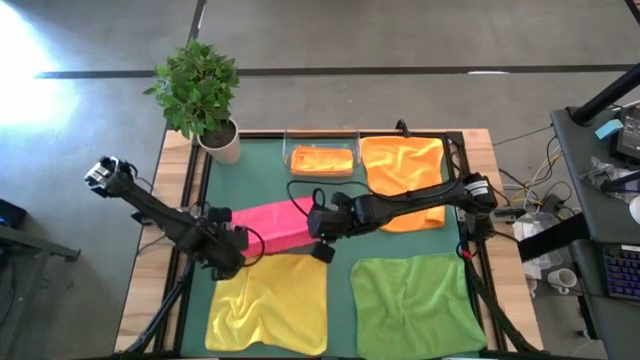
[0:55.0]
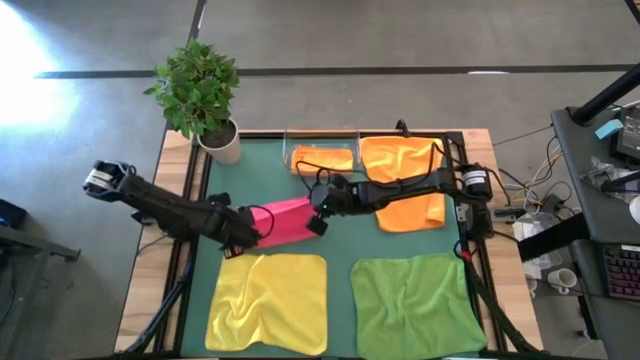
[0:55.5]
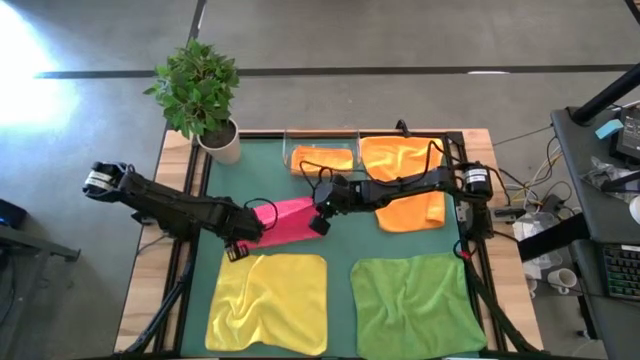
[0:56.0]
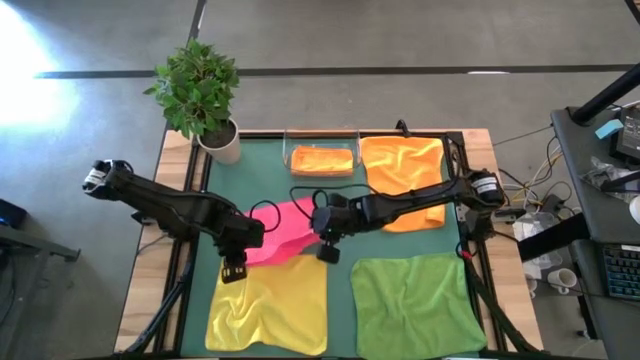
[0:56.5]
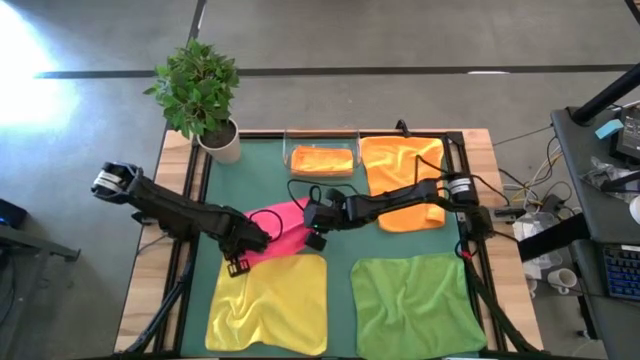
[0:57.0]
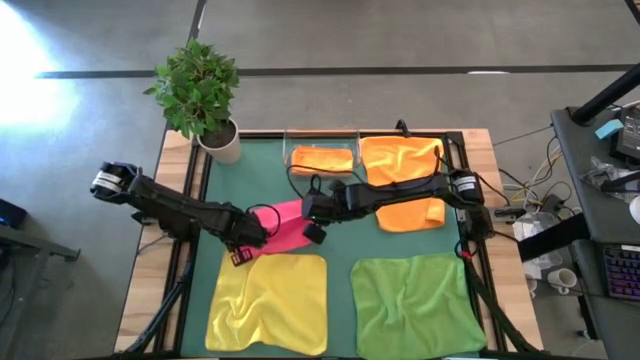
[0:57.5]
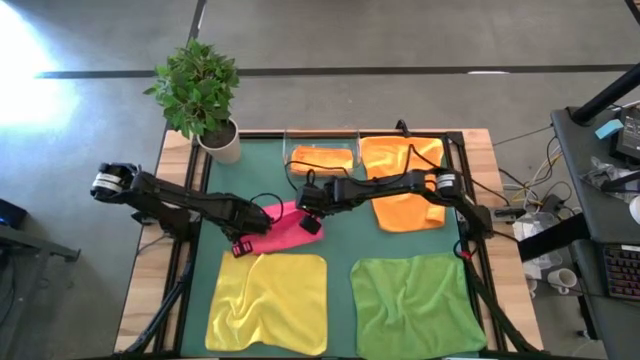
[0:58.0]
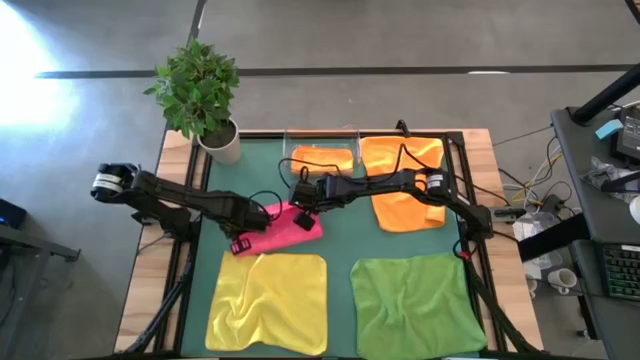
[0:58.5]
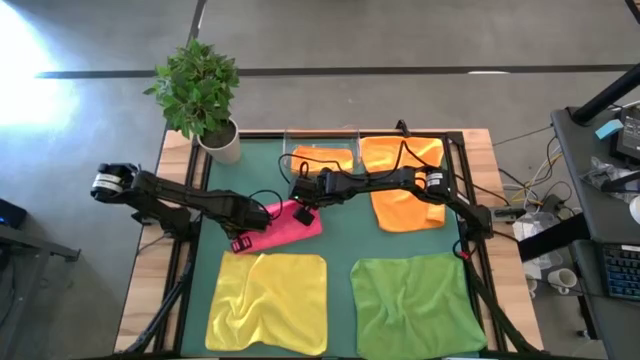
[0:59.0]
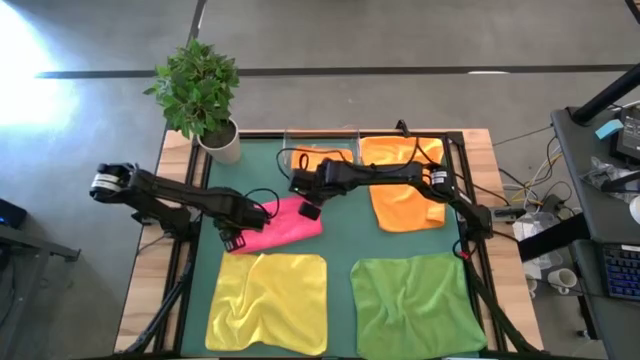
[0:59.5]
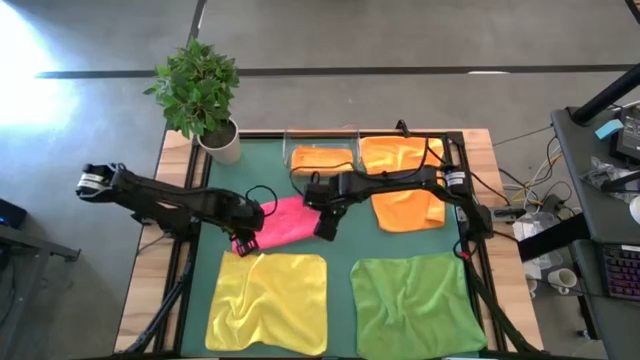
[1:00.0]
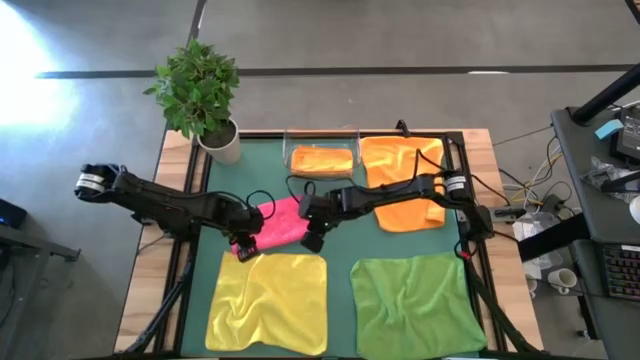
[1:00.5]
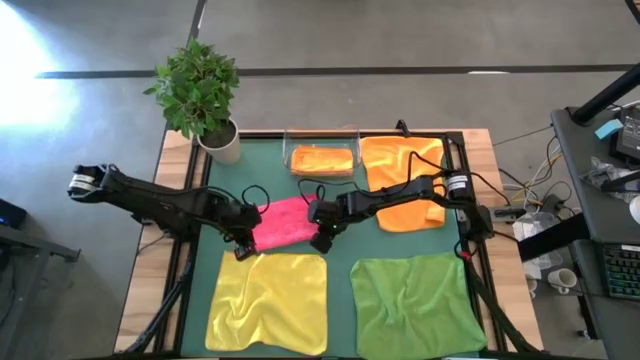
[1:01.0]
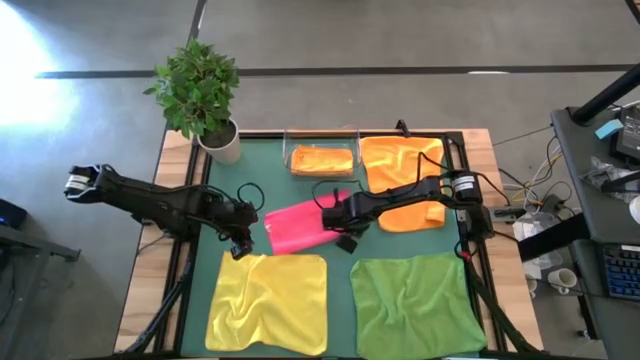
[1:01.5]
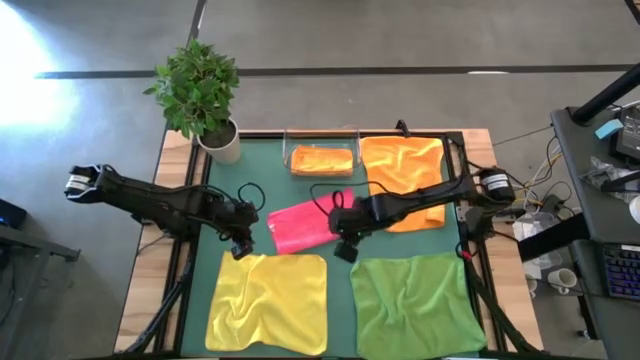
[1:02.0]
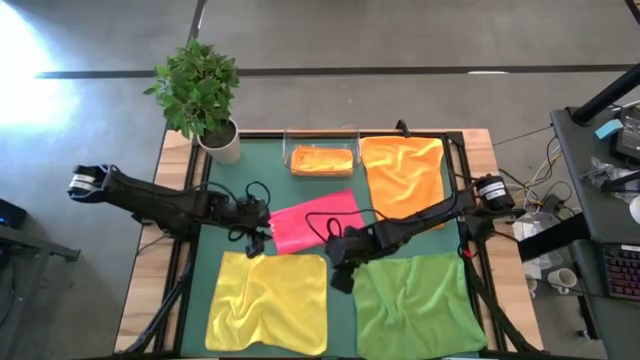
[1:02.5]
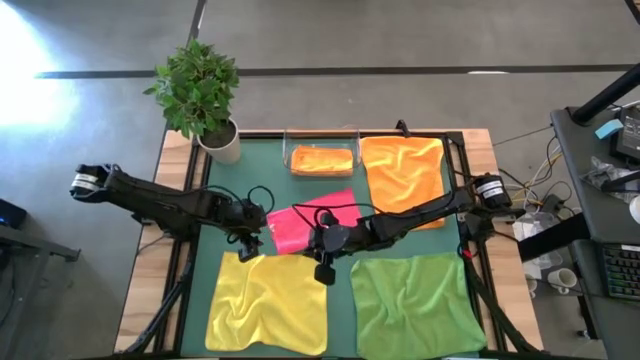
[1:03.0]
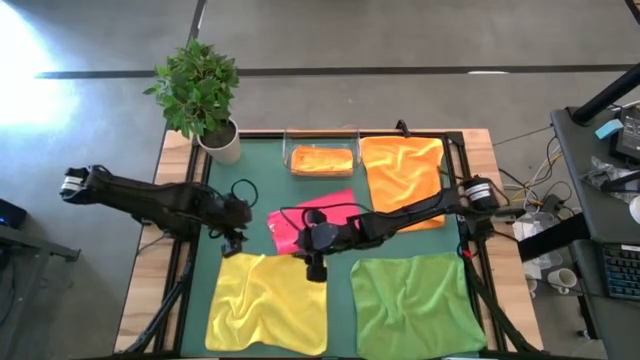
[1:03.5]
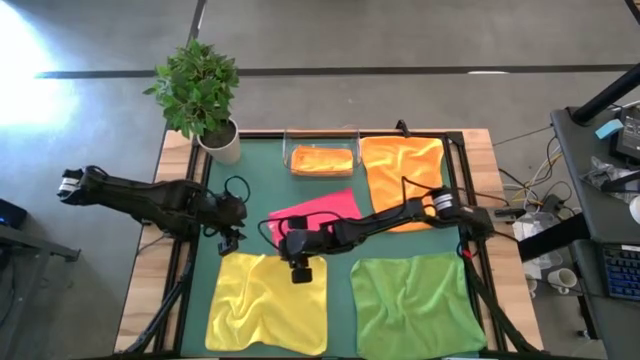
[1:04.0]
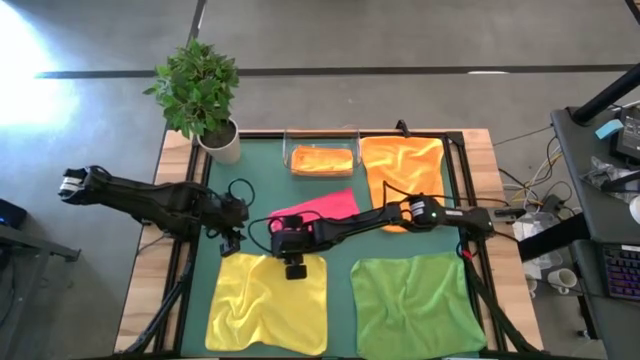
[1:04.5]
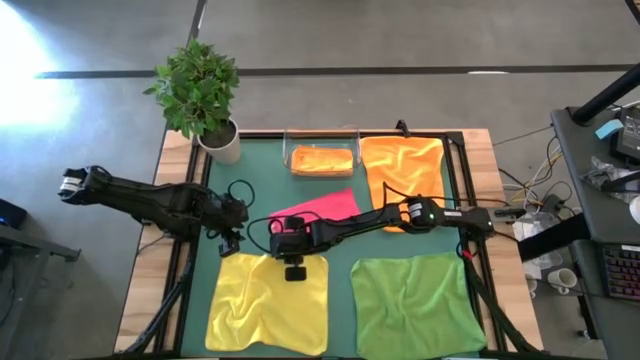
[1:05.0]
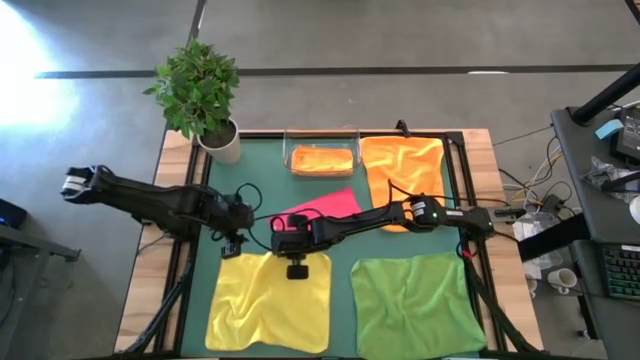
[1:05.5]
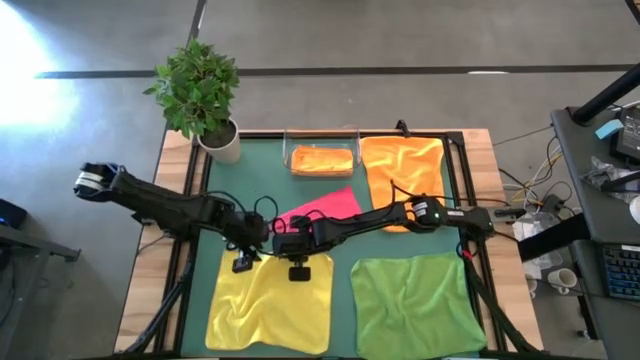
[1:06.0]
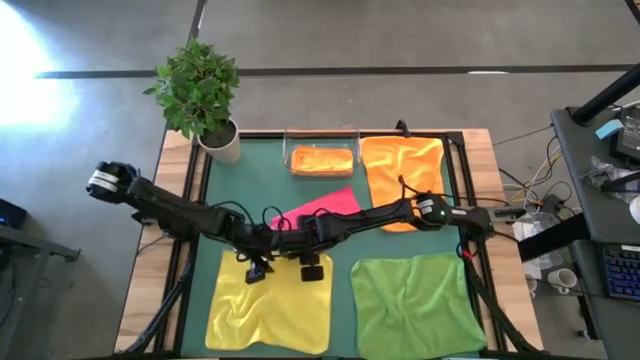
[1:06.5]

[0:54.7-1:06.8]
Task: Fold microfiber towels
Fold the pink microfiber cloth

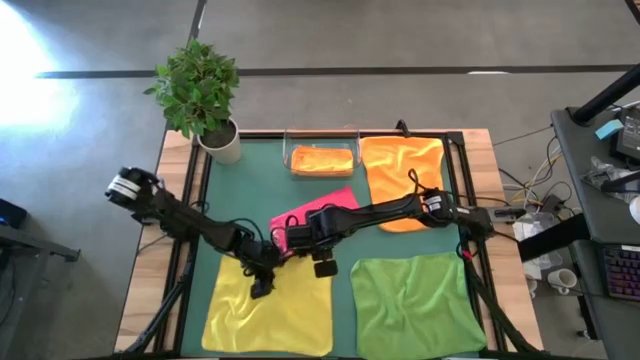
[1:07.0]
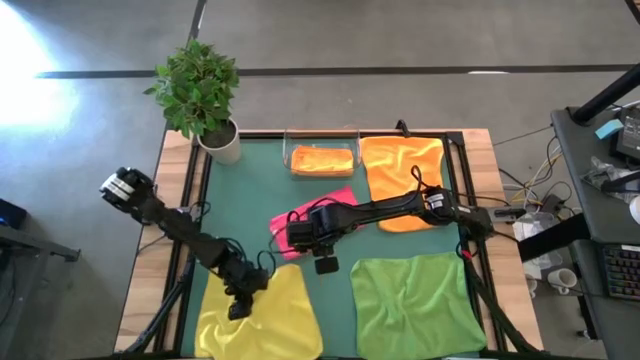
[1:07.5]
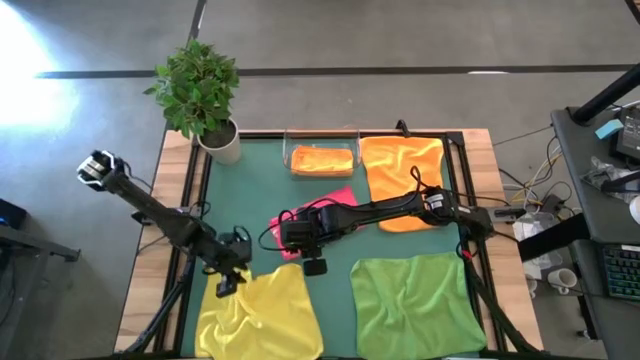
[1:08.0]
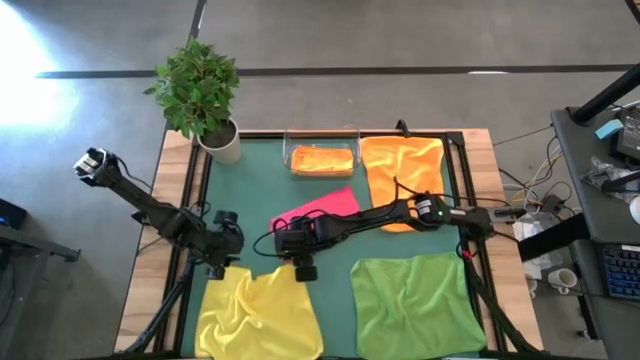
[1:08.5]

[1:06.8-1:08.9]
Adjust the yellow microfiber cloth

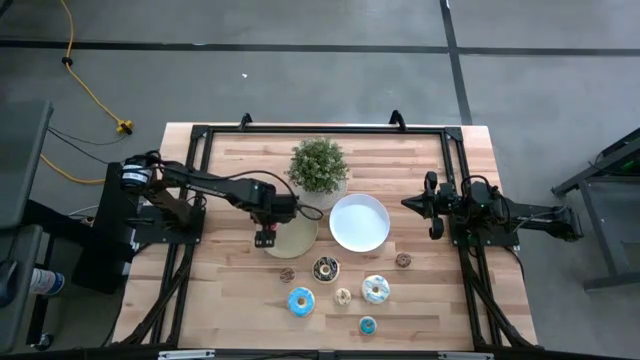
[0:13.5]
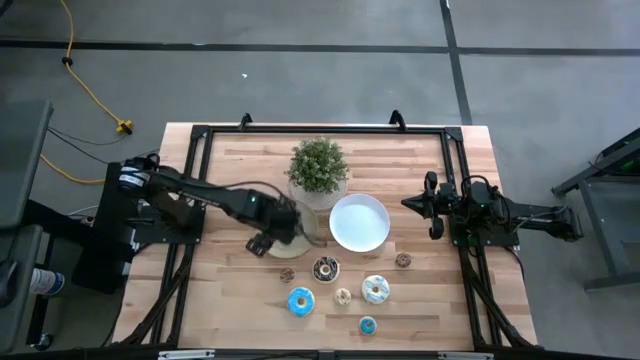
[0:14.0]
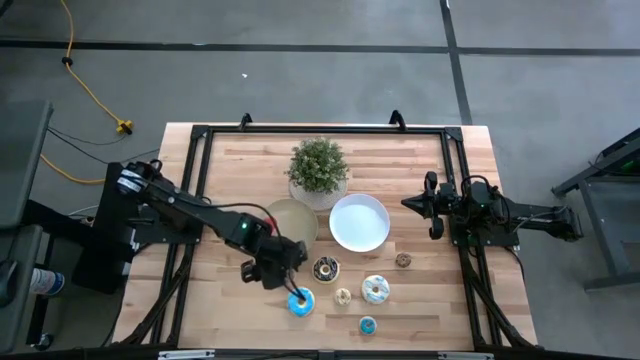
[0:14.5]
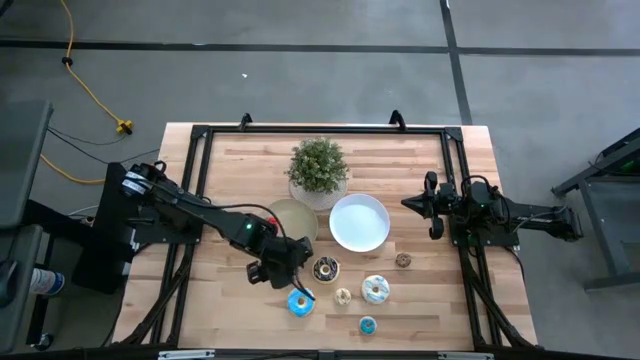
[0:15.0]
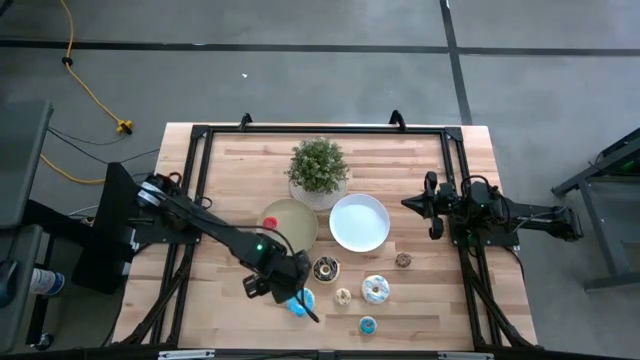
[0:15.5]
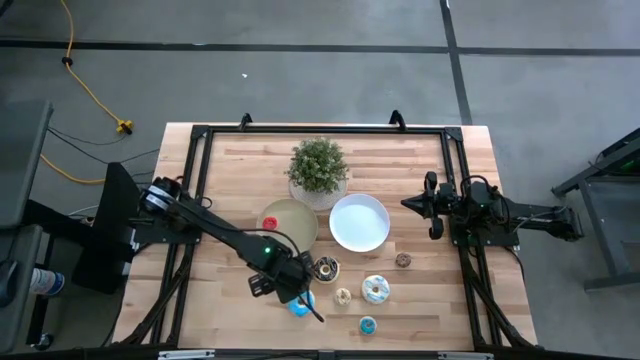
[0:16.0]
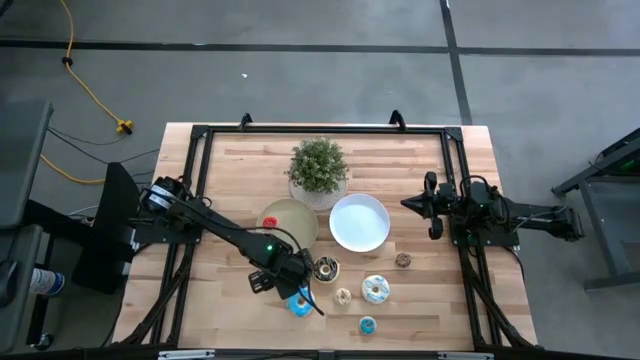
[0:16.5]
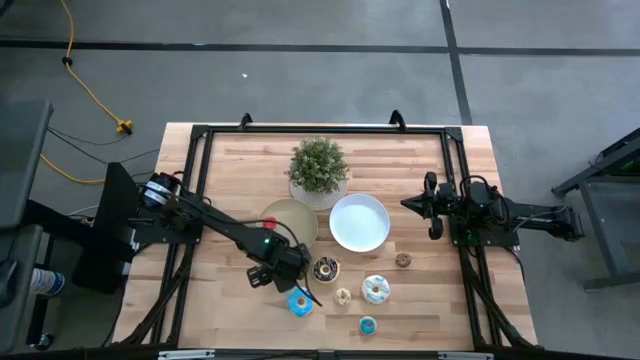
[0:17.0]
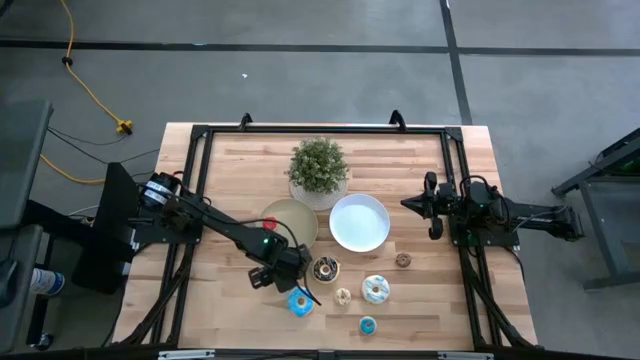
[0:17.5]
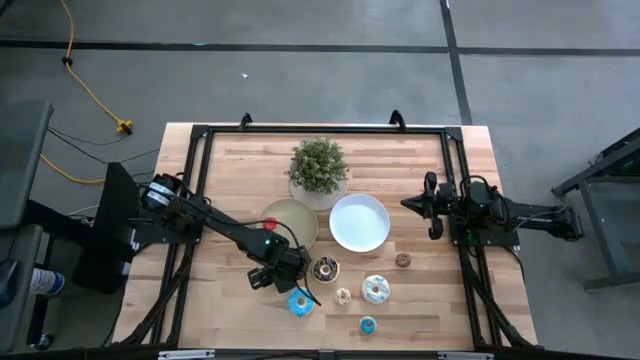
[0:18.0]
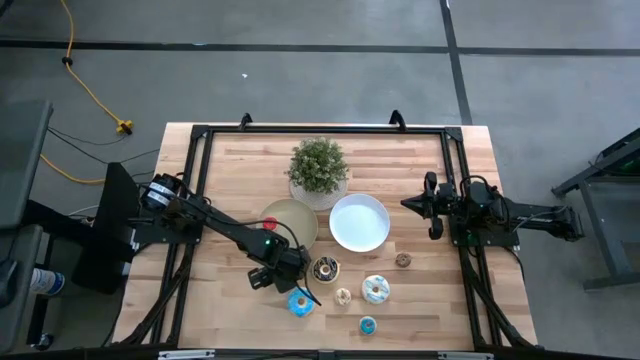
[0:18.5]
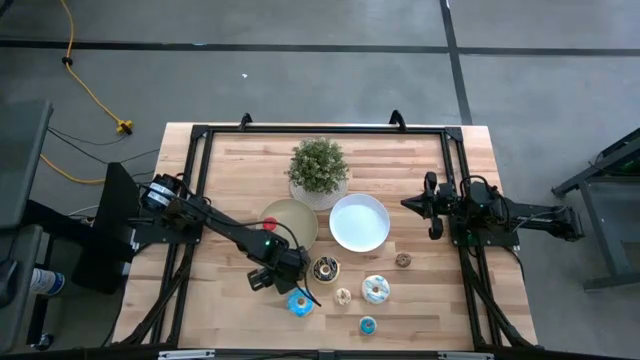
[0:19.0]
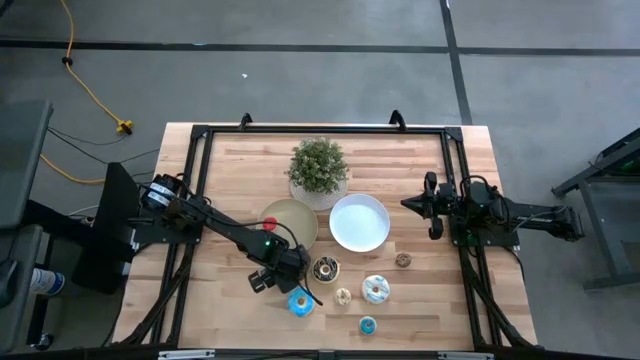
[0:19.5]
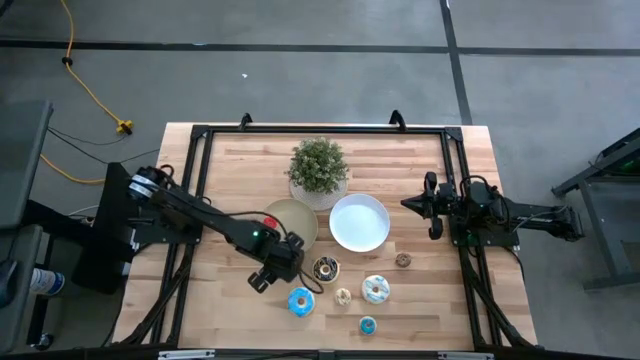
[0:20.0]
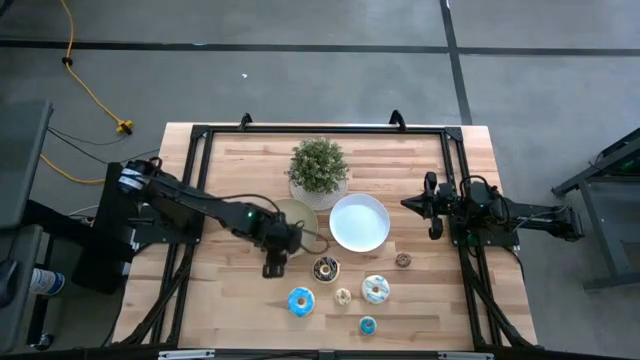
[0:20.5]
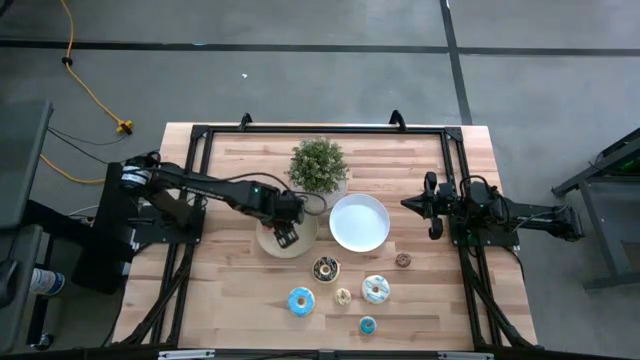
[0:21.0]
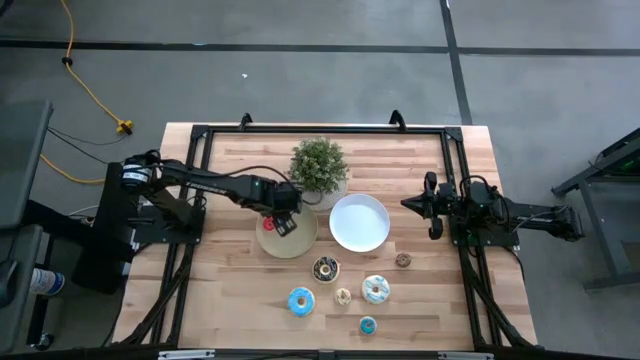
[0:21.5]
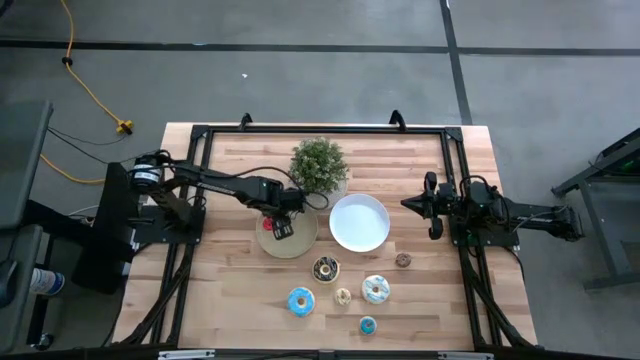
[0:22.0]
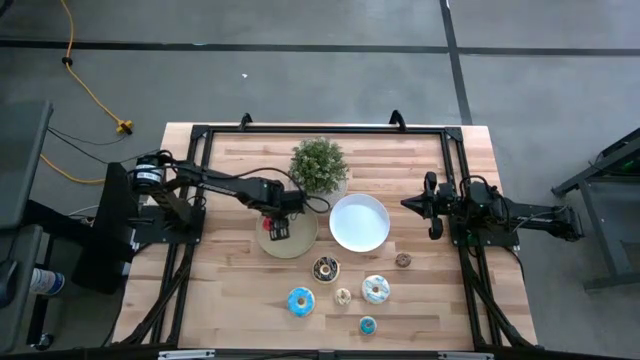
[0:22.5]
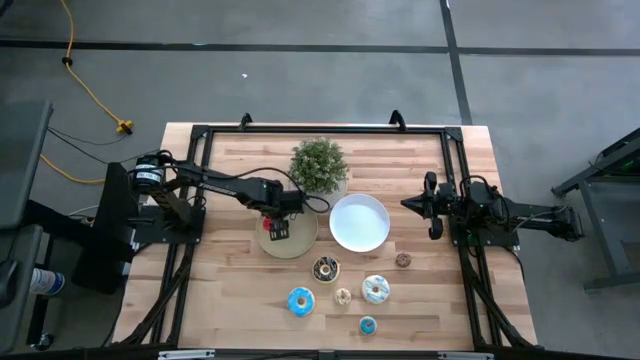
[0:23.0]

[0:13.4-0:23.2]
Task: Pick & Place donuts
Put the small left brown donut on the brown plate
